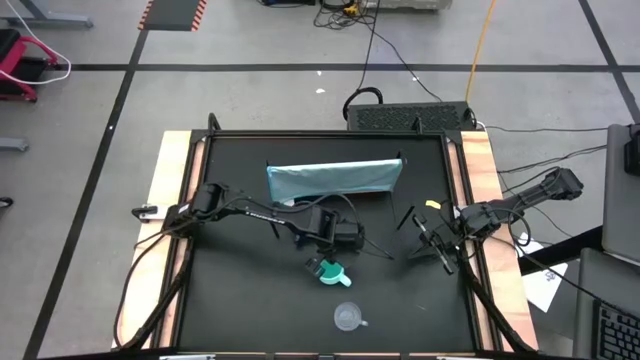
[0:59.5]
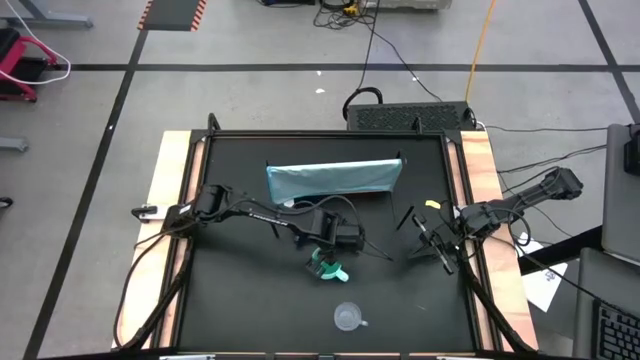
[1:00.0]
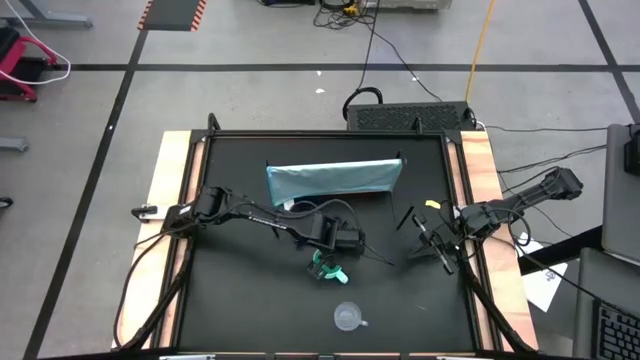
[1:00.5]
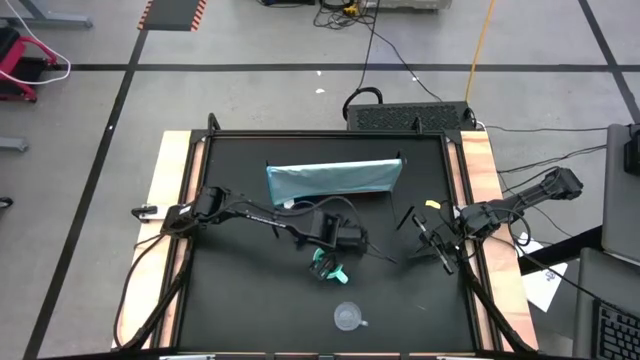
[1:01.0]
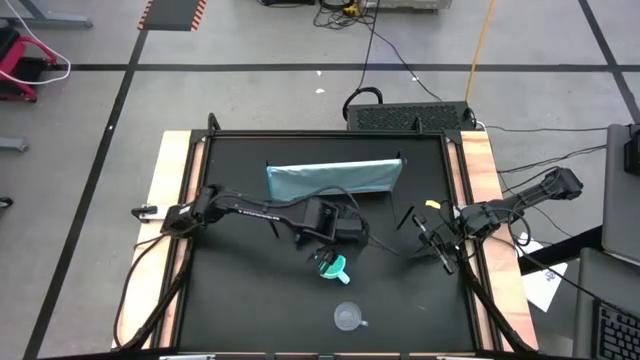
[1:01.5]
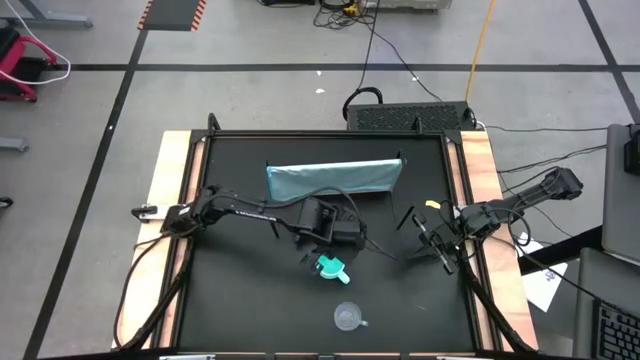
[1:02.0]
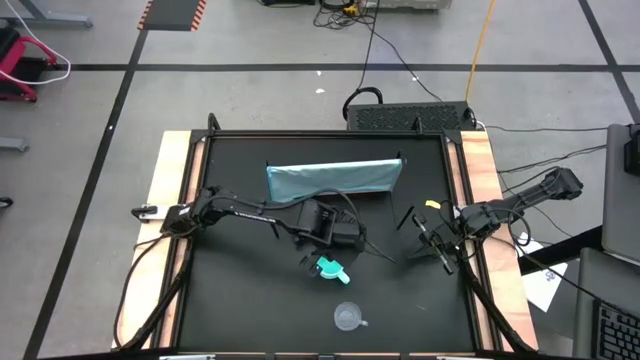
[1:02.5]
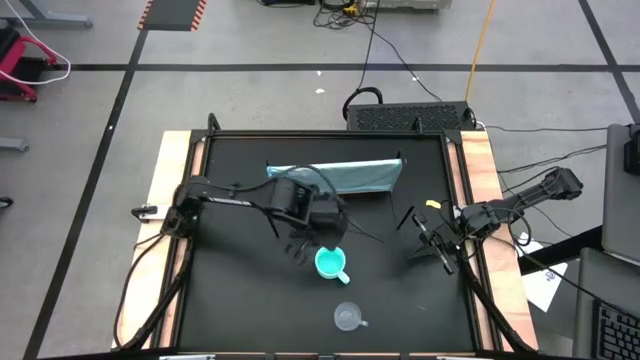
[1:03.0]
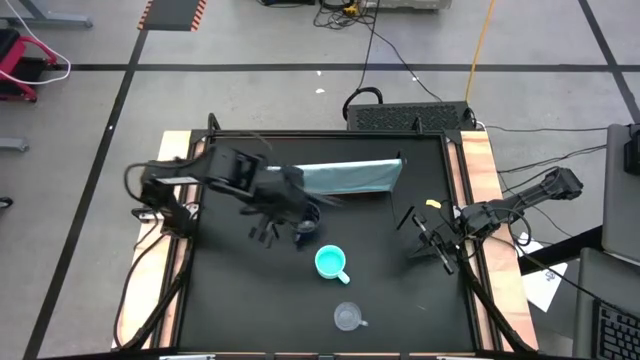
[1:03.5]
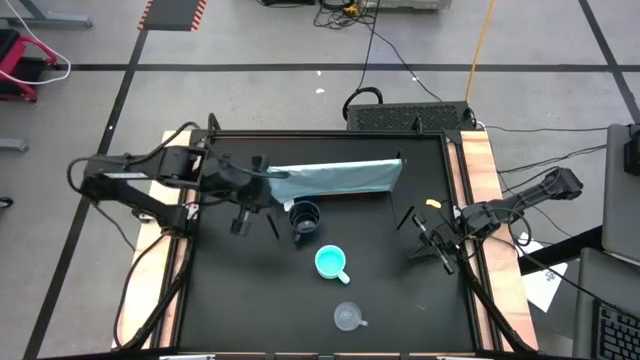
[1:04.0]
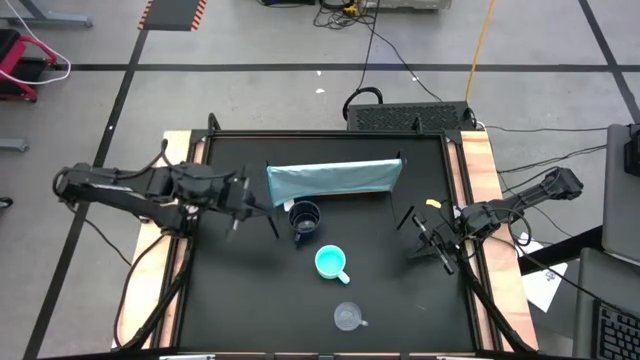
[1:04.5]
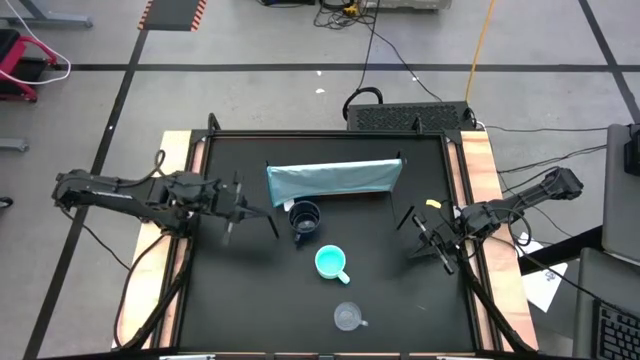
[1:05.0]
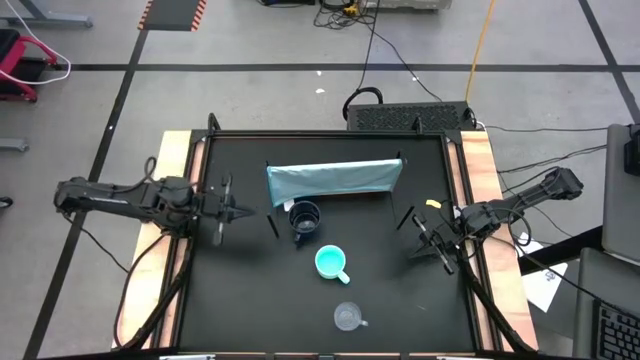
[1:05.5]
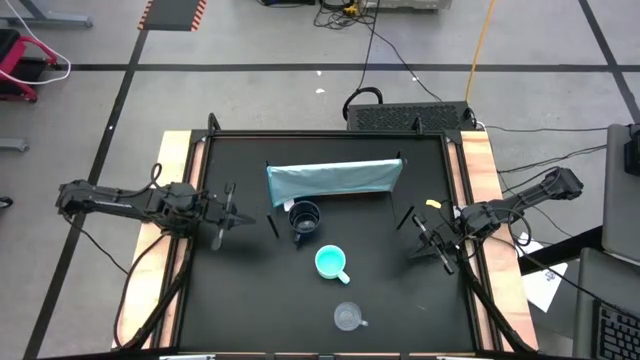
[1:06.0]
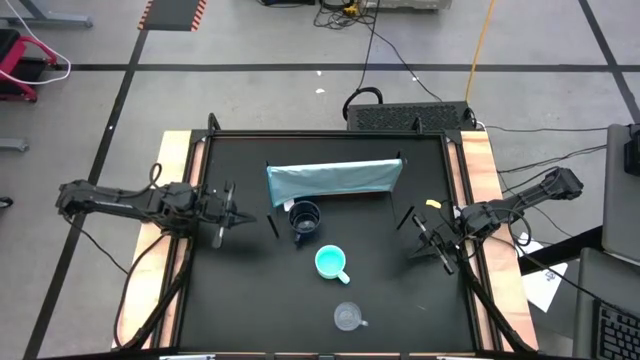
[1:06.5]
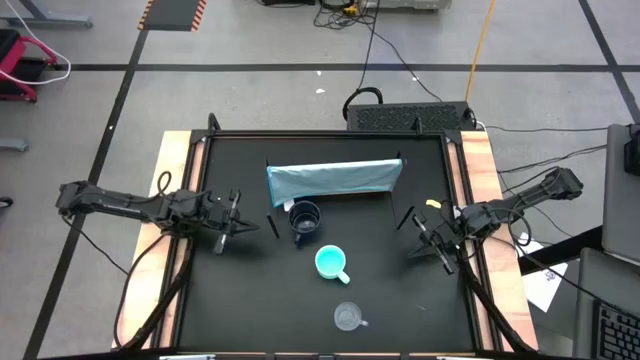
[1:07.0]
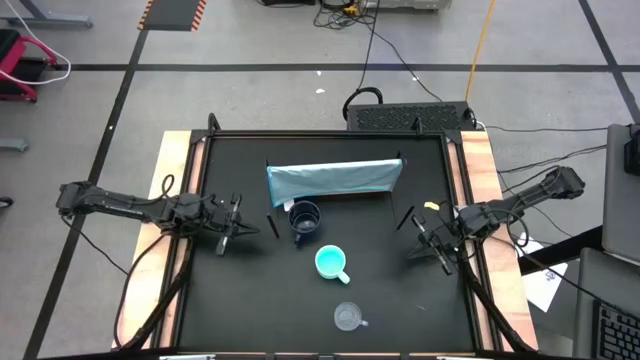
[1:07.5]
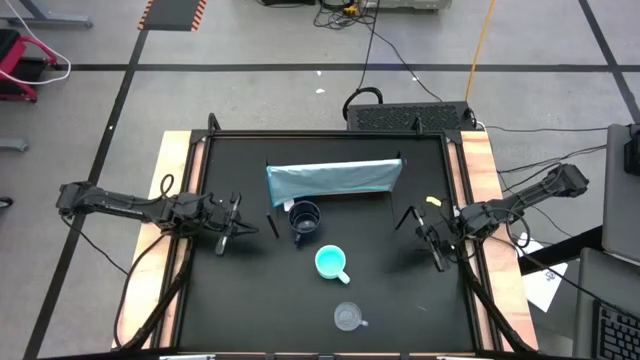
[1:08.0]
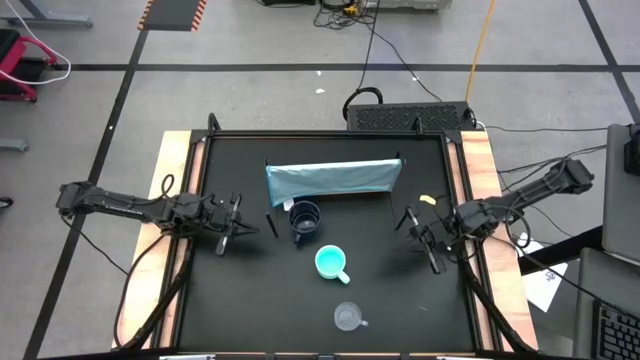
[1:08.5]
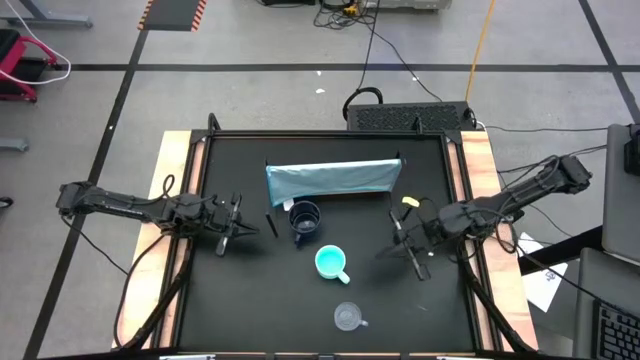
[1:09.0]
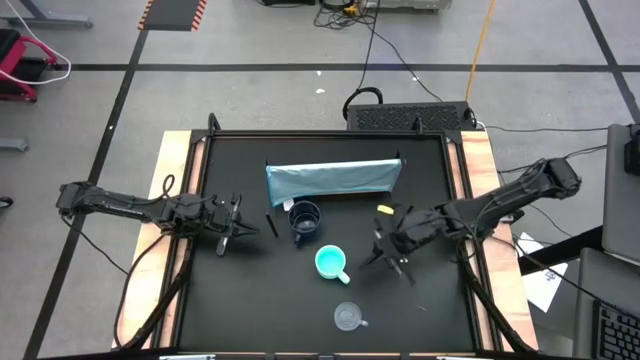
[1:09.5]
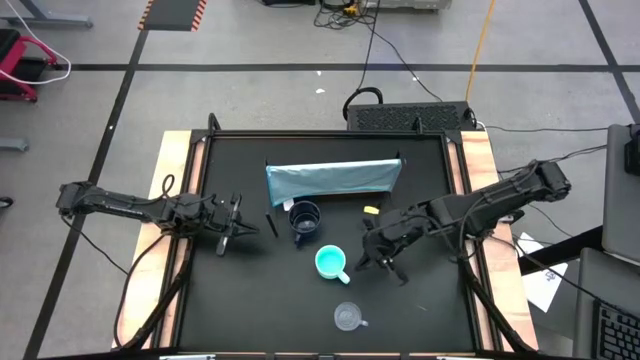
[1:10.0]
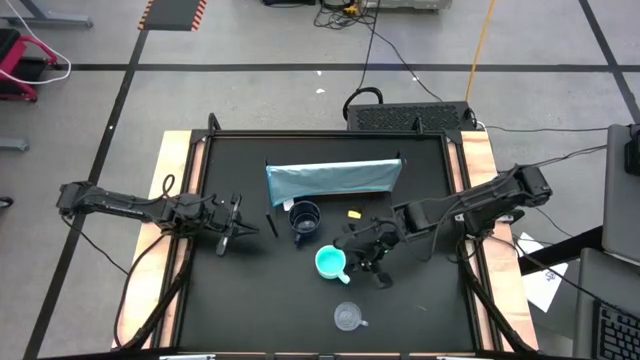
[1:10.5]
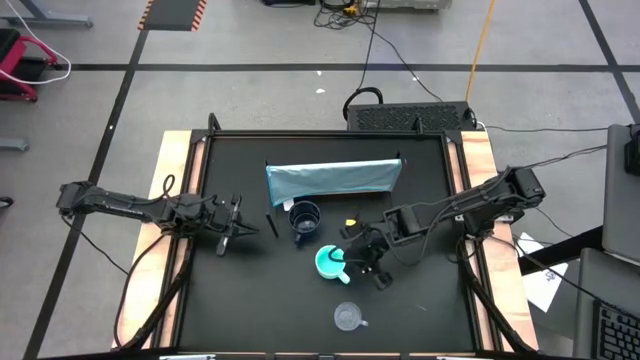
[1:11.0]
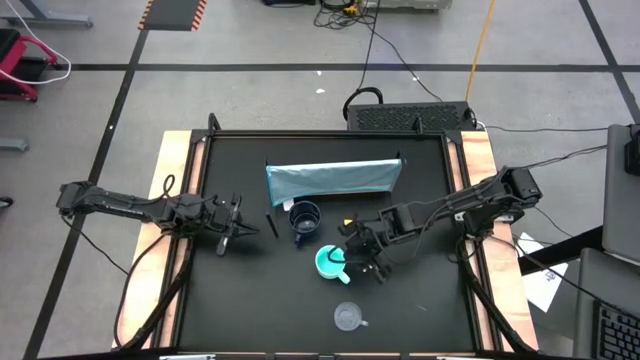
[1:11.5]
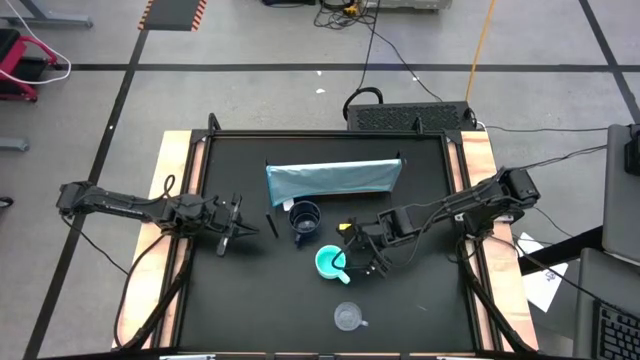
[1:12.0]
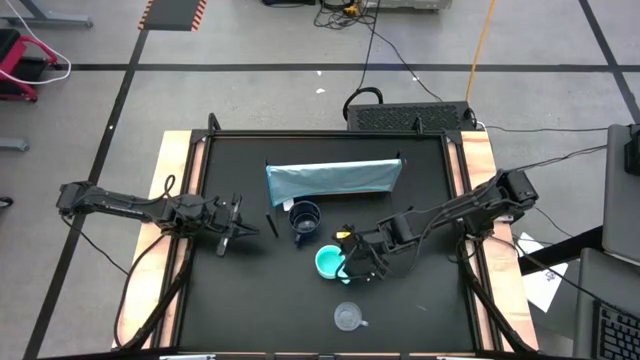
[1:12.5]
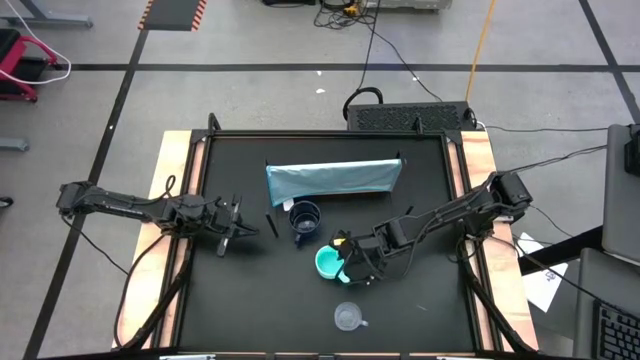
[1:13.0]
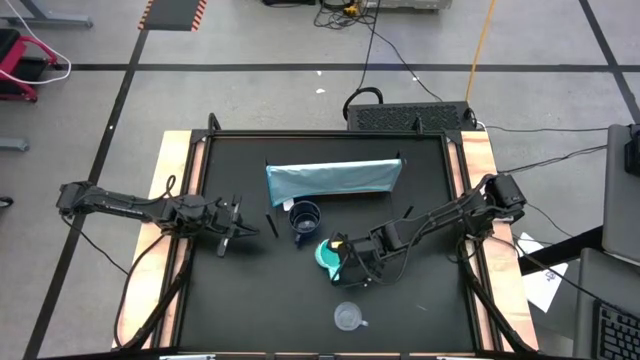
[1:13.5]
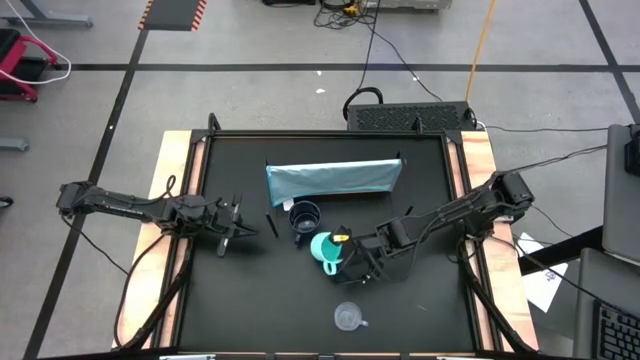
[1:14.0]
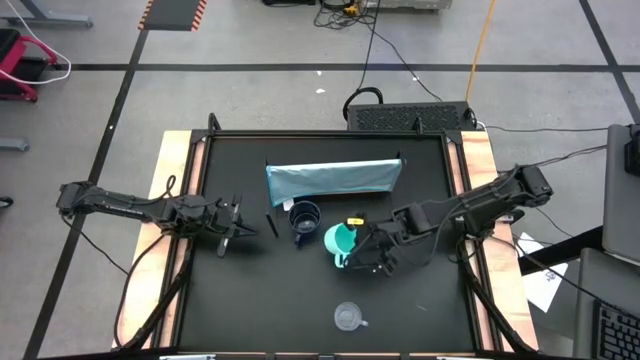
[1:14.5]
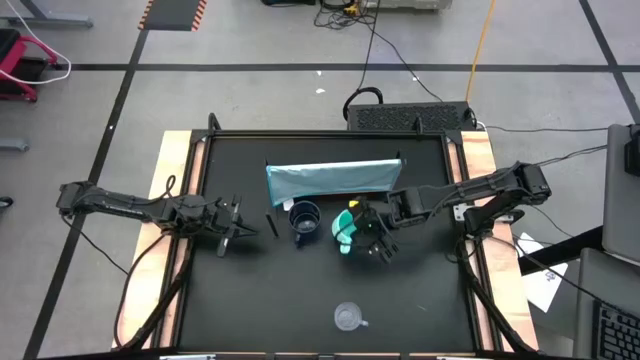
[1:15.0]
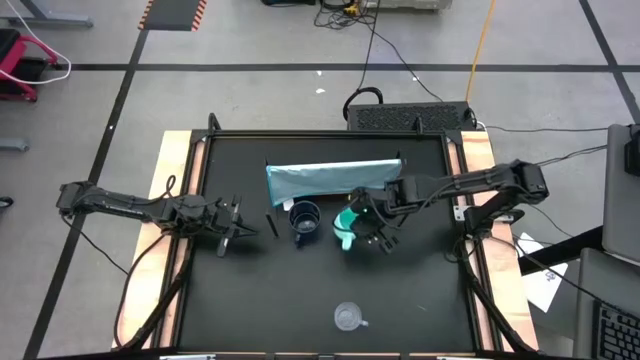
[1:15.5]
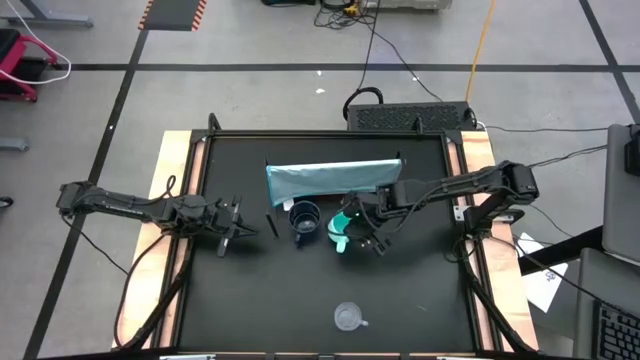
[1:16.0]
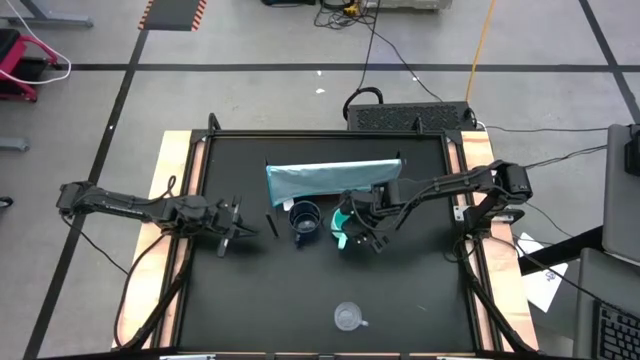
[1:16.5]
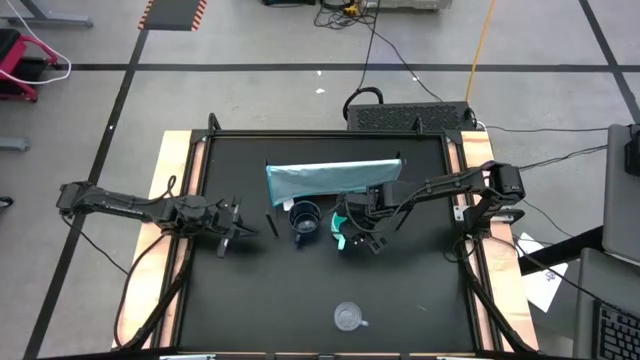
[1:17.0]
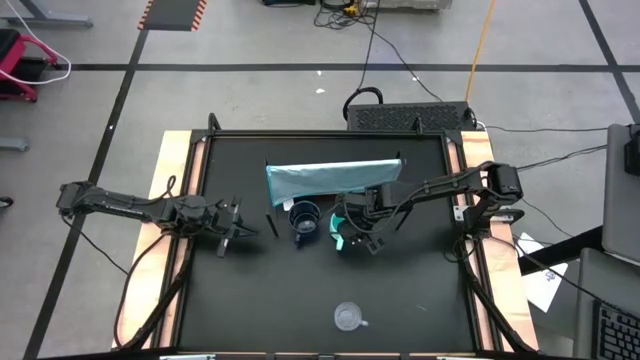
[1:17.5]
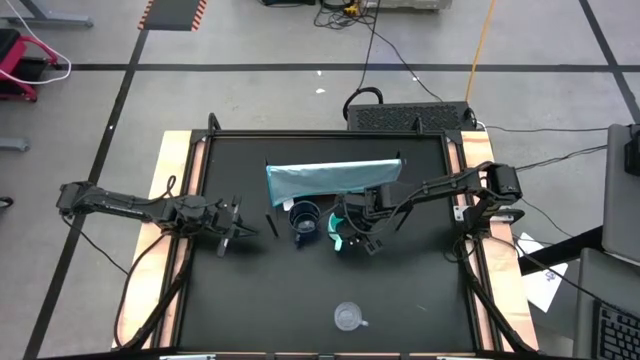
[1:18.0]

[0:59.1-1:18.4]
Task: Stack small to large cups/mugs on shelf
Move the light blue mug to the center of the table
